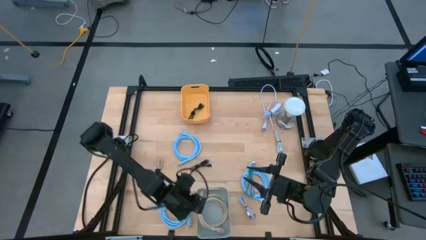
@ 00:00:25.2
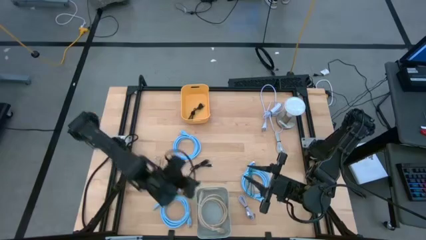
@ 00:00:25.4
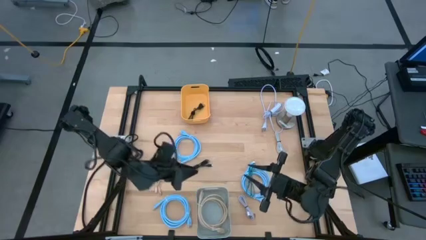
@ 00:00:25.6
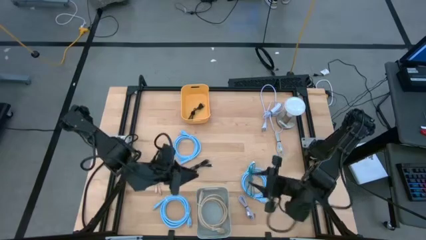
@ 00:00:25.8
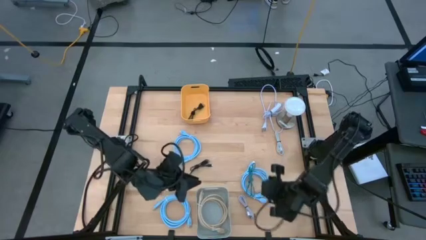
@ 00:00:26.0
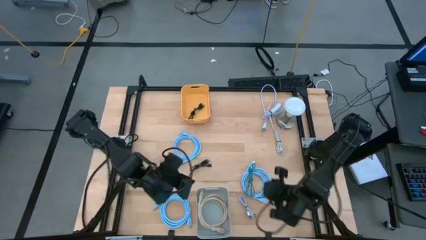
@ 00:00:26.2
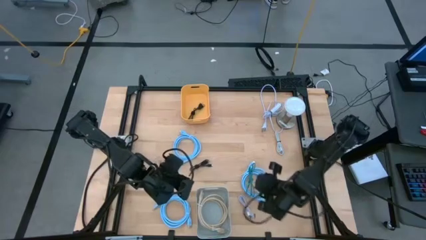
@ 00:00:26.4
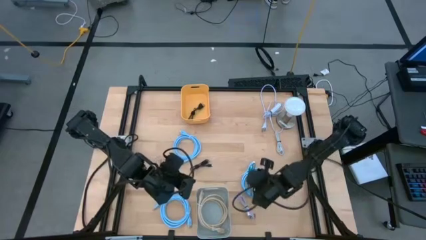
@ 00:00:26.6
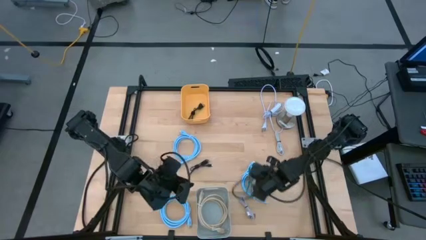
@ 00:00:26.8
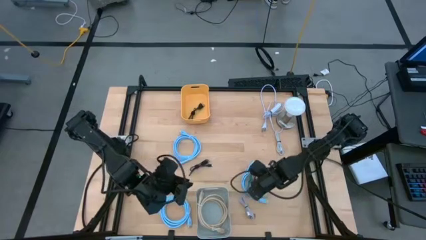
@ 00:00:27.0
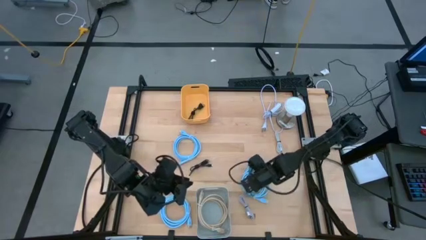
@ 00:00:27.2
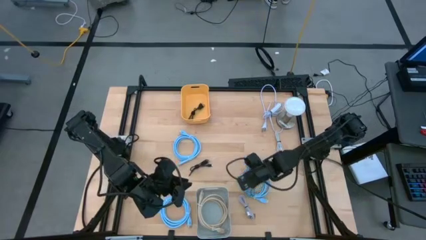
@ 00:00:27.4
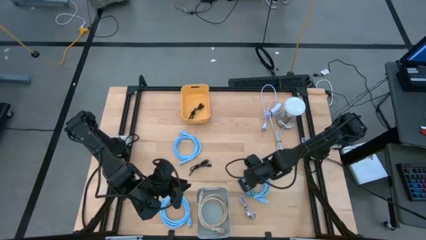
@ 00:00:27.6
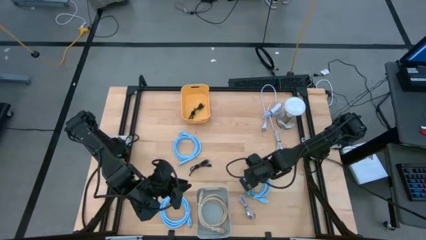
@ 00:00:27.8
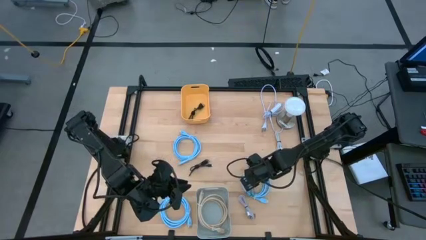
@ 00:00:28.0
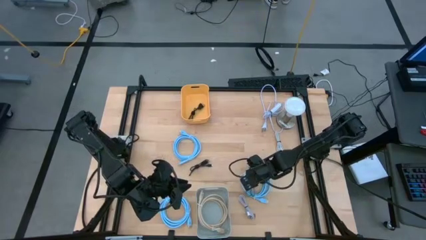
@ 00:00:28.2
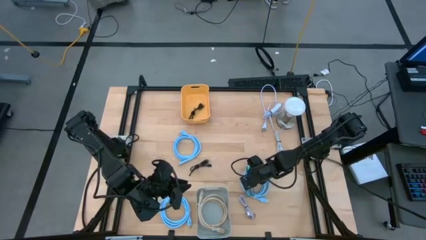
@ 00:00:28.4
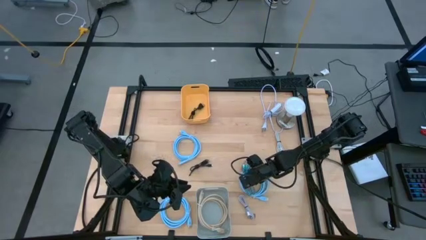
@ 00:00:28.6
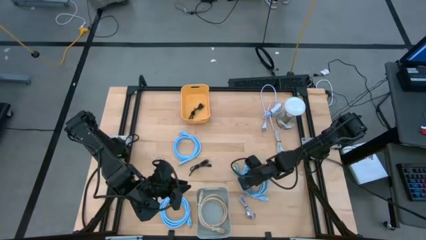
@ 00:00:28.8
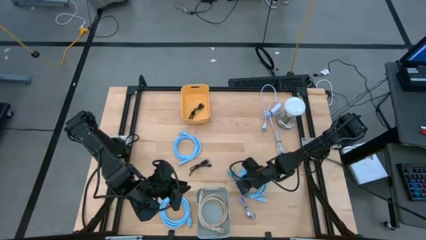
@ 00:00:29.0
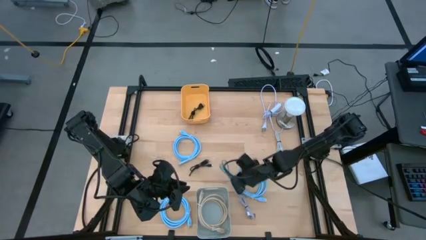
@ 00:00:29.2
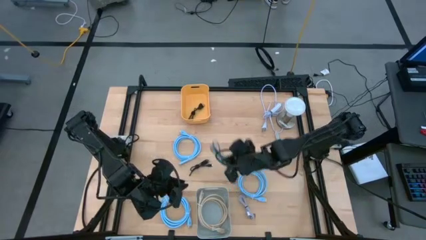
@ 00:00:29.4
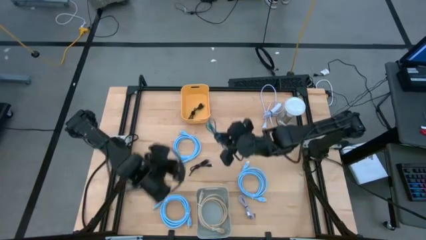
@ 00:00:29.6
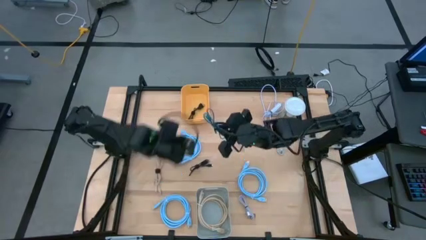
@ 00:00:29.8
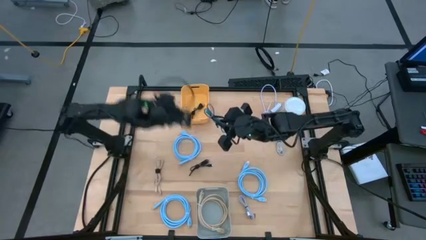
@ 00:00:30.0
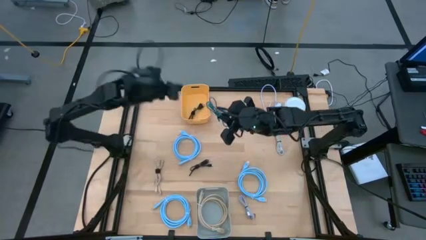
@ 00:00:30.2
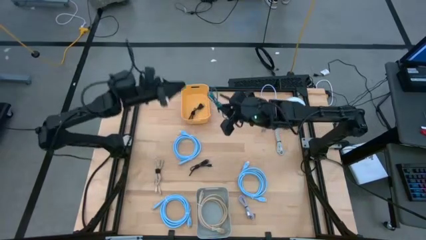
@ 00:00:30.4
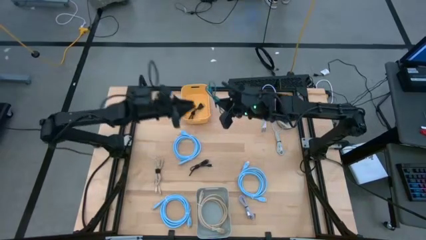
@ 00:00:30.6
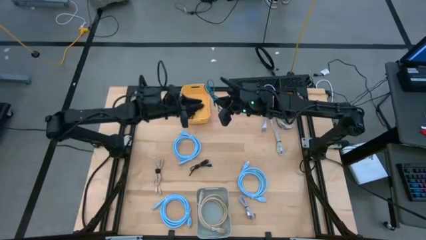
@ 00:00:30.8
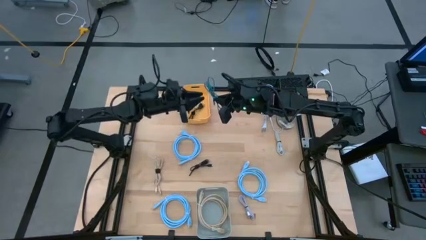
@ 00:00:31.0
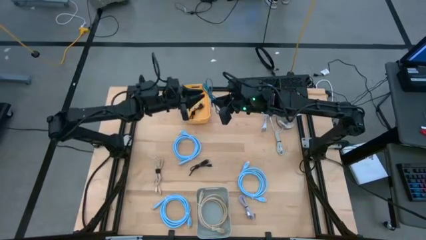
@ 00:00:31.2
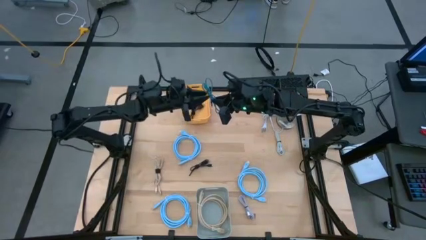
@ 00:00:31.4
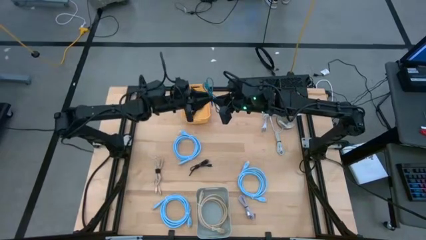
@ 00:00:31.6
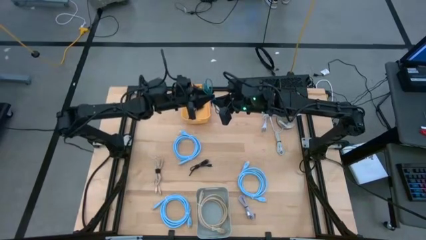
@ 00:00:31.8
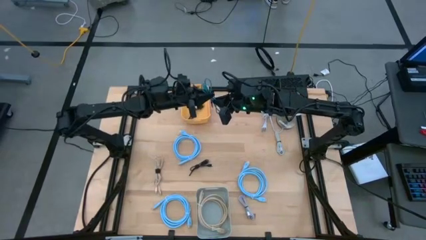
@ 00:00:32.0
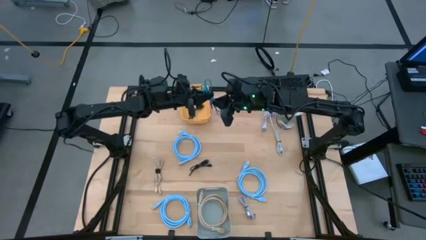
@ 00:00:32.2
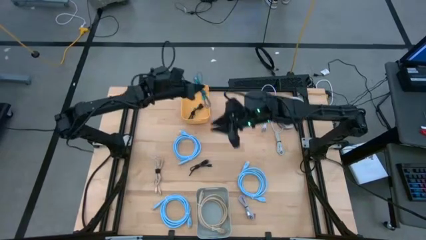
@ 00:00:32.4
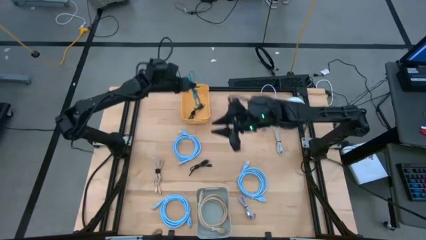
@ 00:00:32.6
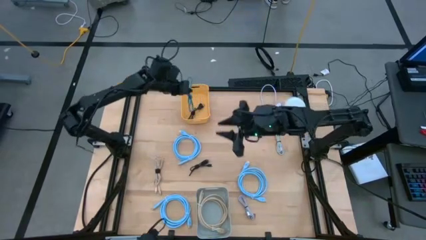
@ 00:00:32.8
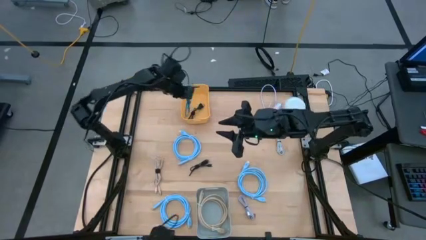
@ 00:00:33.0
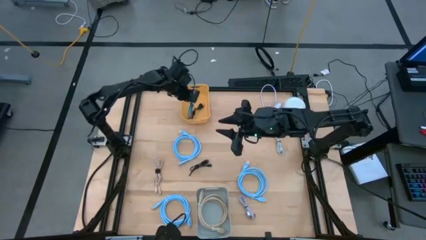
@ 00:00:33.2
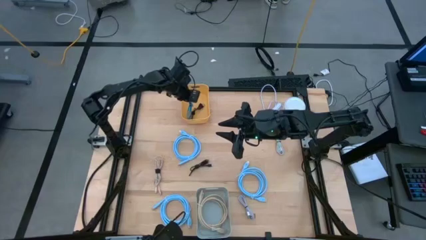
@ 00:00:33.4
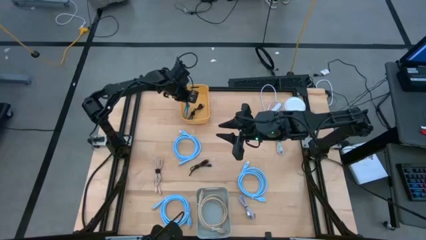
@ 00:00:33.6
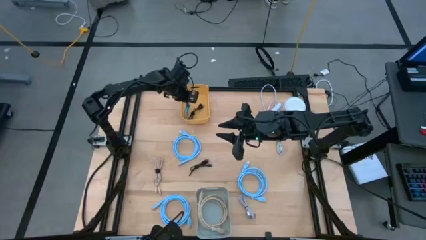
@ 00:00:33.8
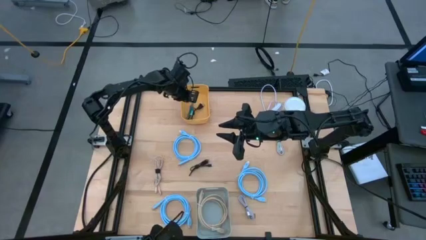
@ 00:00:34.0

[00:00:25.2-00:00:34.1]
Task: Pick & Place USB Port
Put the blue charger cable into the yellow bin

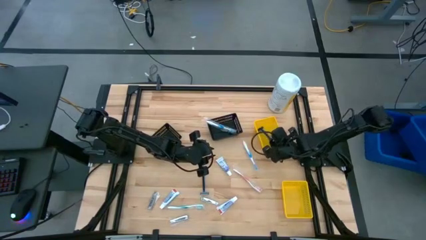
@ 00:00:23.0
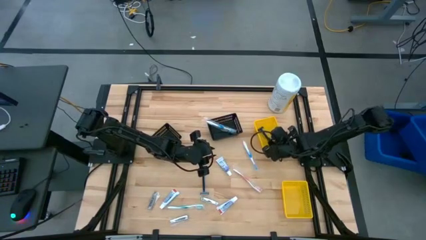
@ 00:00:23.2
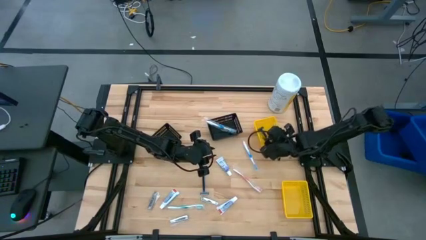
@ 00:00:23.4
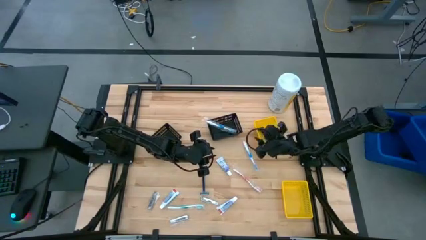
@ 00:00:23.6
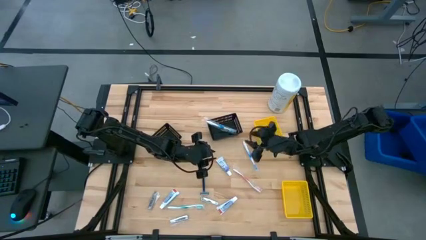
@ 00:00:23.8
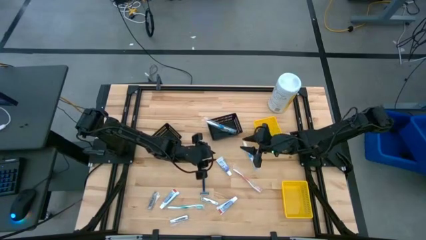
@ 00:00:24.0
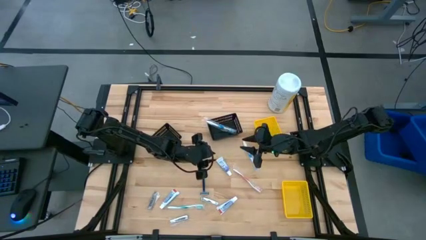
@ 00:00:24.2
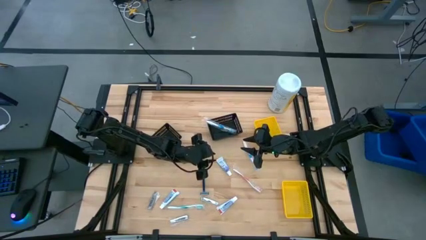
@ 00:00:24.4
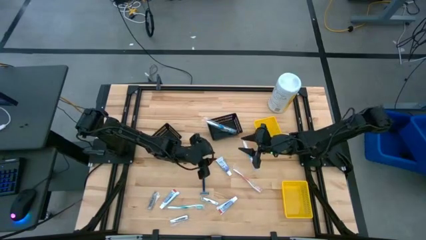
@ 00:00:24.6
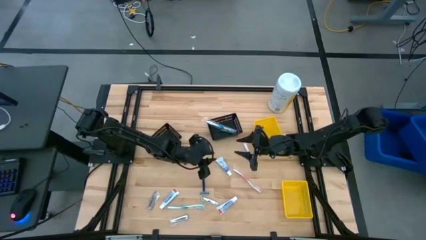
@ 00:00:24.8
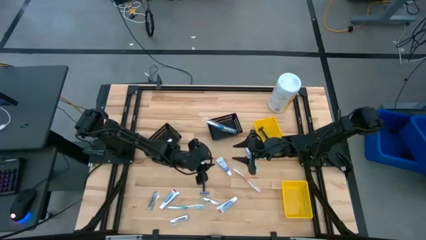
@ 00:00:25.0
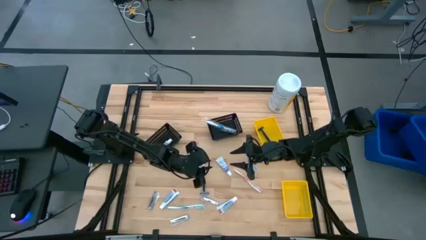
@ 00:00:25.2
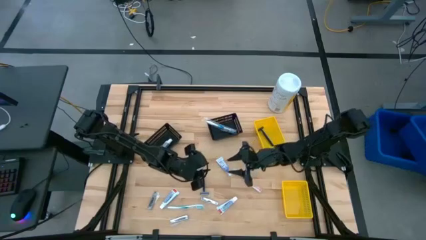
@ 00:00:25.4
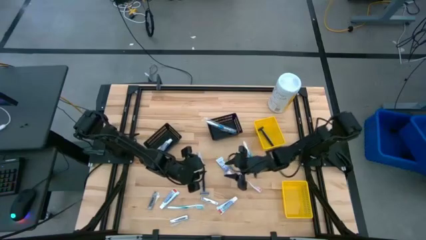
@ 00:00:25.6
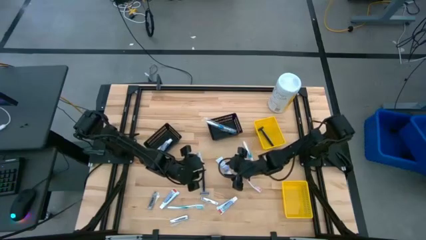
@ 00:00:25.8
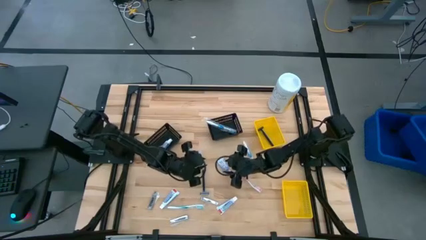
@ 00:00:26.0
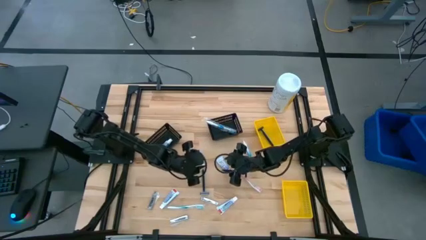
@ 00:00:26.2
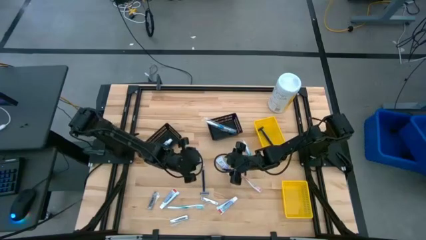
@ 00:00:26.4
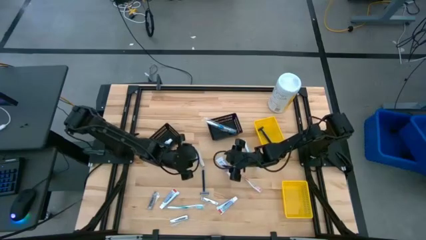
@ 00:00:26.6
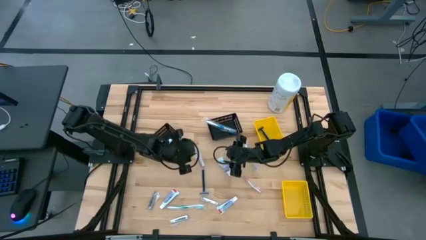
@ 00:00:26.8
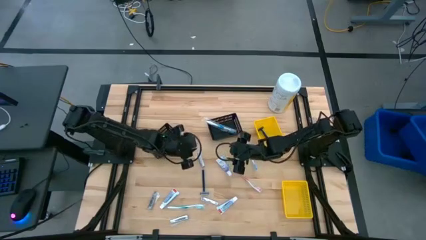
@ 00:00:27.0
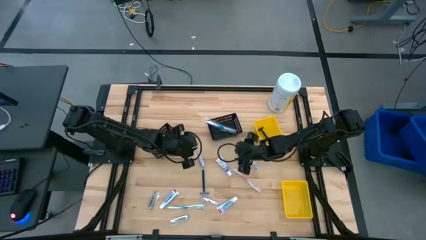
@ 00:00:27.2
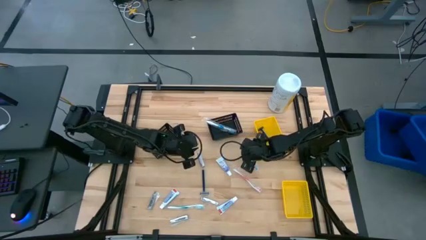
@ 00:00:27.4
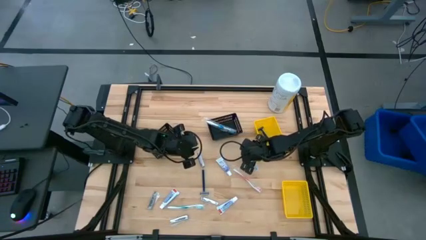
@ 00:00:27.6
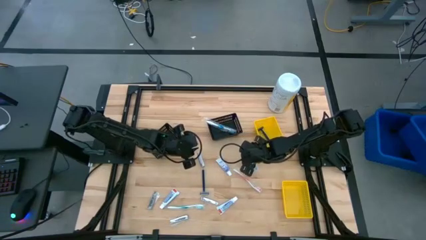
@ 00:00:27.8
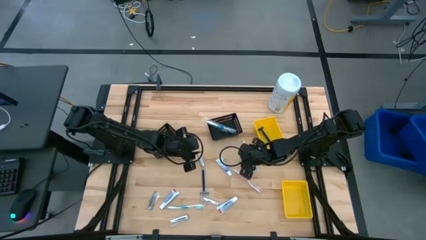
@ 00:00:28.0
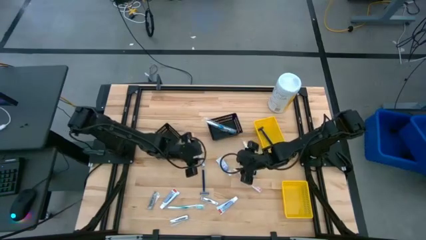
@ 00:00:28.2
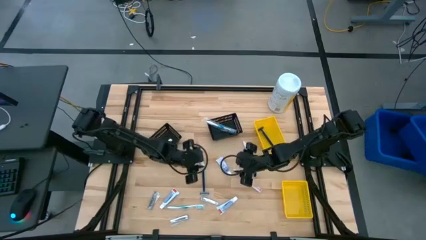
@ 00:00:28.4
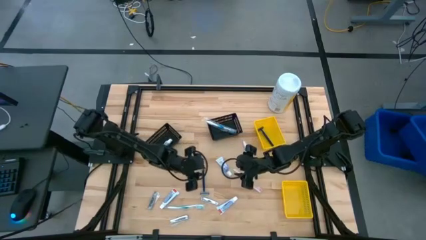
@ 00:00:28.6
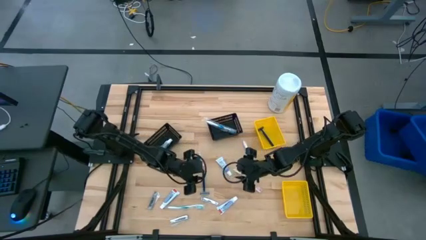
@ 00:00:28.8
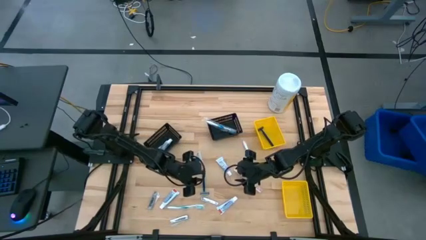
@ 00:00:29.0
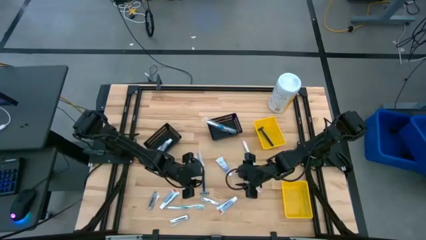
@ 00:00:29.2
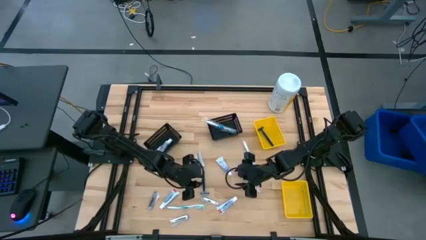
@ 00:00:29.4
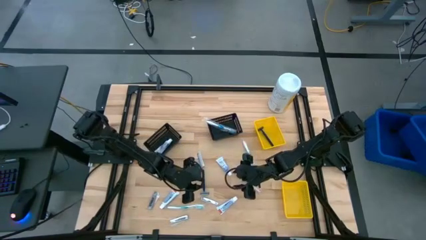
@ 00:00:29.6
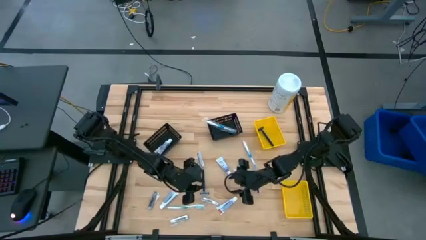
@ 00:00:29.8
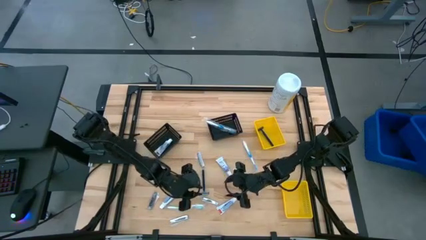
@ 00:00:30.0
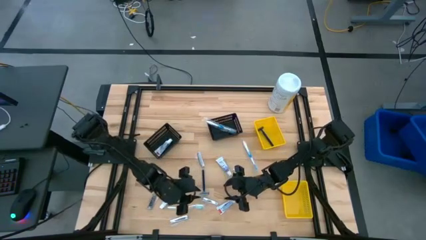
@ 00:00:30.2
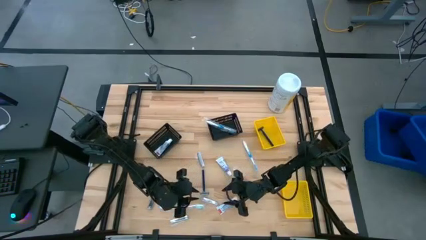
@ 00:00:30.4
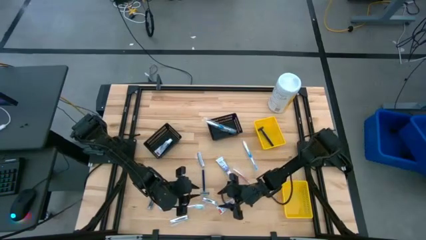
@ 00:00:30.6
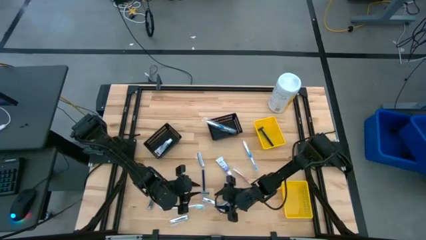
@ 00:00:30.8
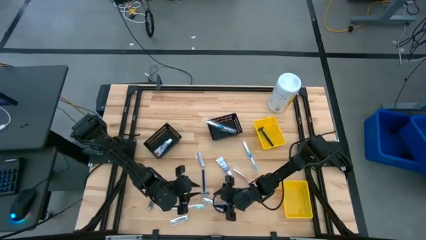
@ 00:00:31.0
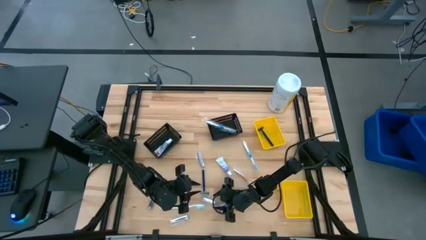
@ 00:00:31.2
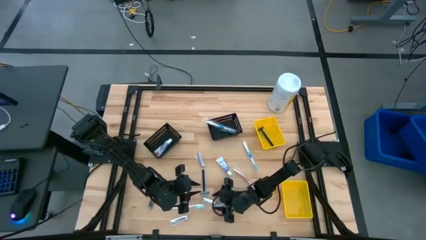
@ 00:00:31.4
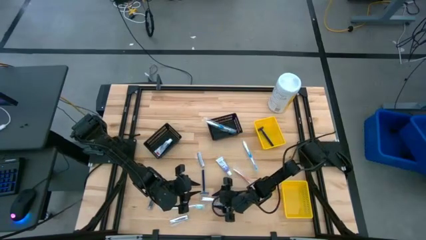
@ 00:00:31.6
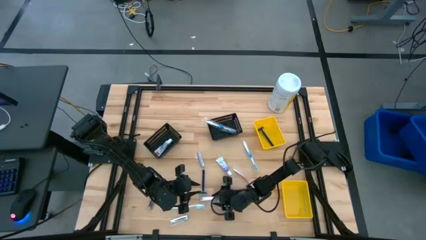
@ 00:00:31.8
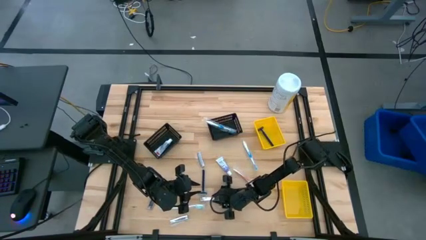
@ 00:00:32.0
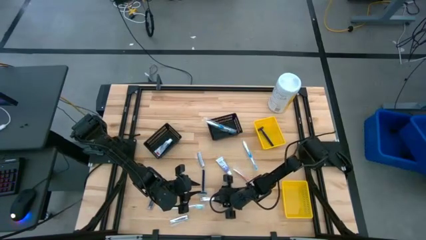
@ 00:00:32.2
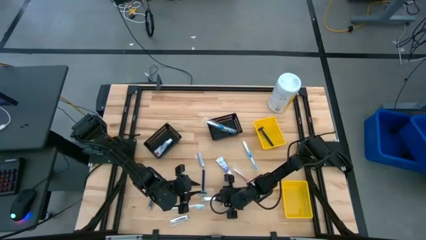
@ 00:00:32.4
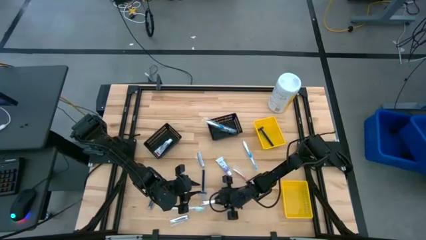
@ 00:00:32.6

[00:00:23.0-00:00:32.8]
Task: Pick & Place Travel size toiletries
Put the silver nail cutter into the bottom yellow basket
